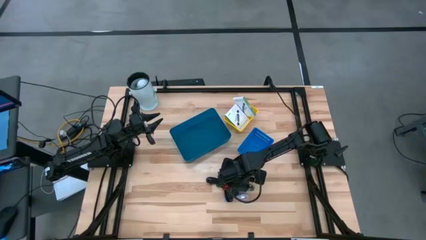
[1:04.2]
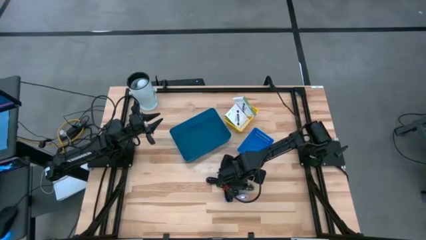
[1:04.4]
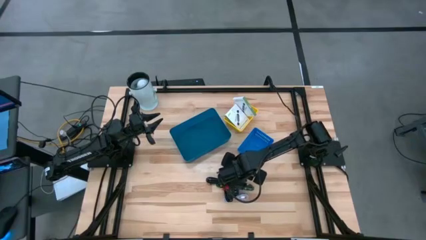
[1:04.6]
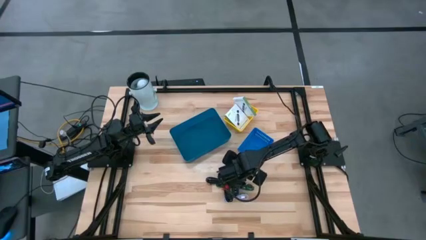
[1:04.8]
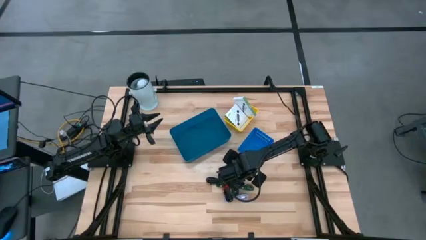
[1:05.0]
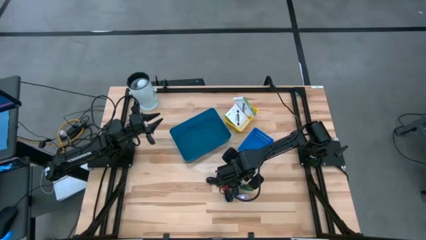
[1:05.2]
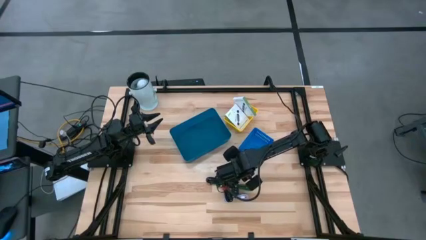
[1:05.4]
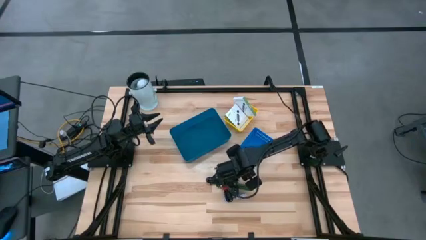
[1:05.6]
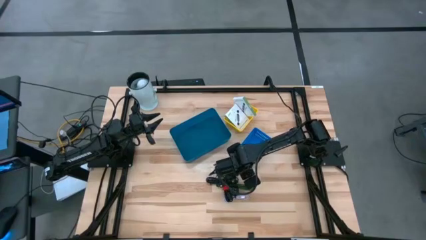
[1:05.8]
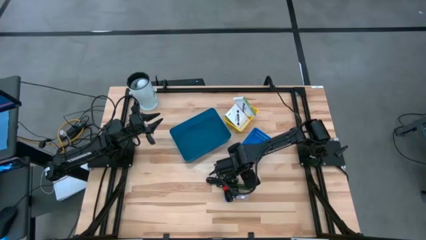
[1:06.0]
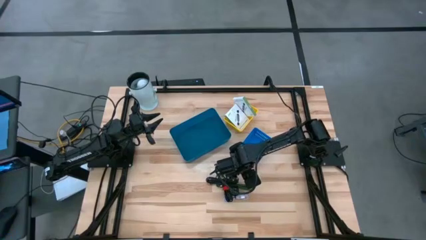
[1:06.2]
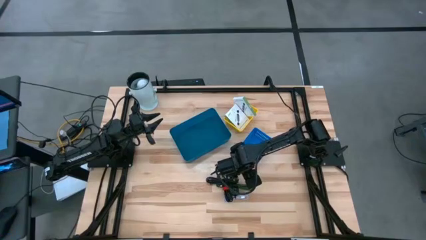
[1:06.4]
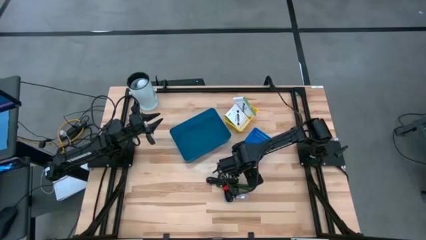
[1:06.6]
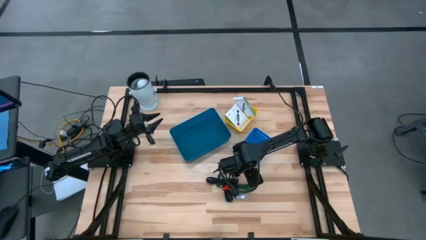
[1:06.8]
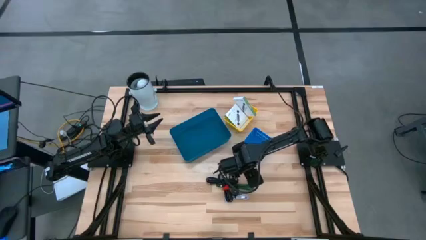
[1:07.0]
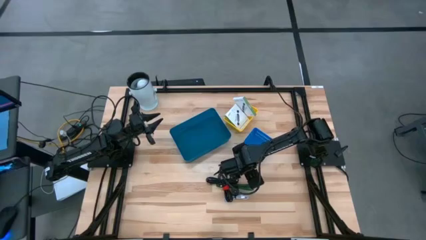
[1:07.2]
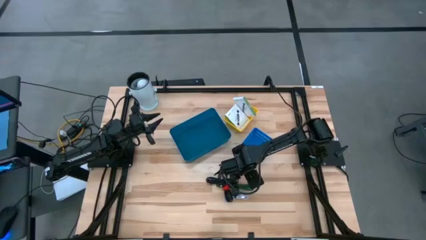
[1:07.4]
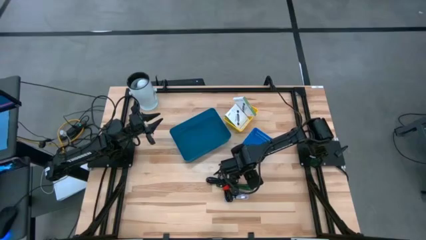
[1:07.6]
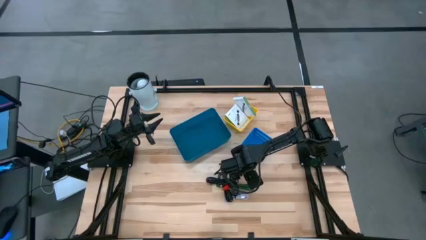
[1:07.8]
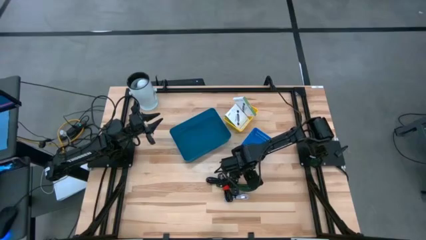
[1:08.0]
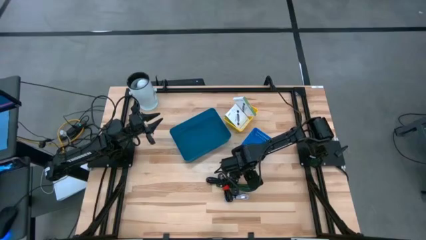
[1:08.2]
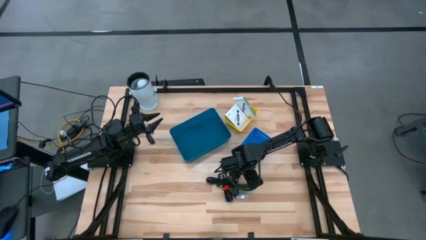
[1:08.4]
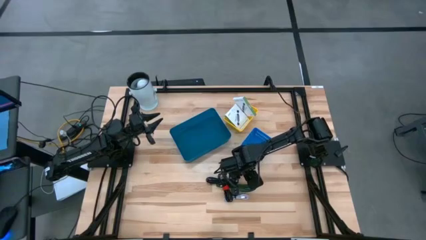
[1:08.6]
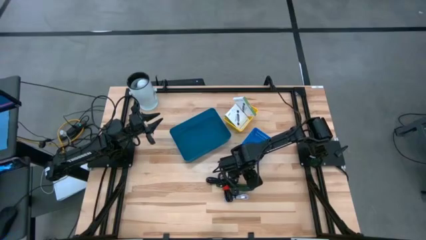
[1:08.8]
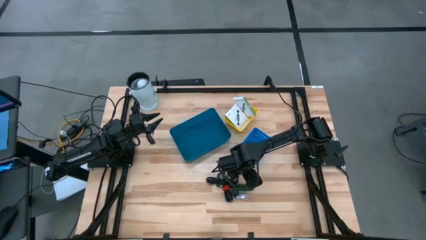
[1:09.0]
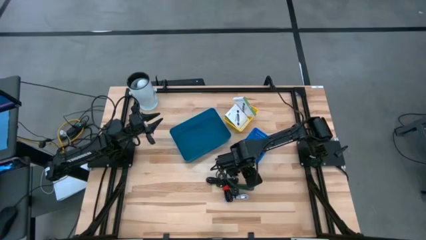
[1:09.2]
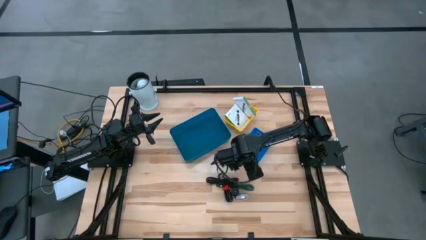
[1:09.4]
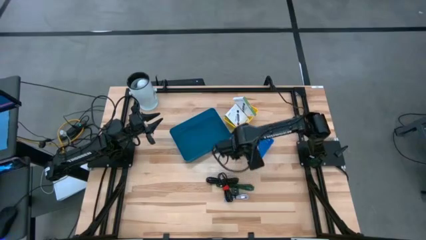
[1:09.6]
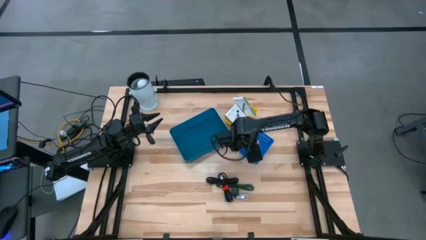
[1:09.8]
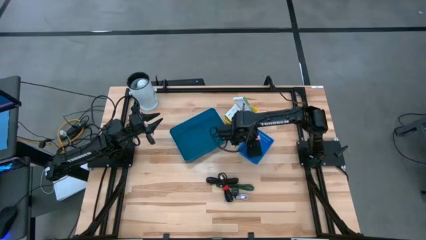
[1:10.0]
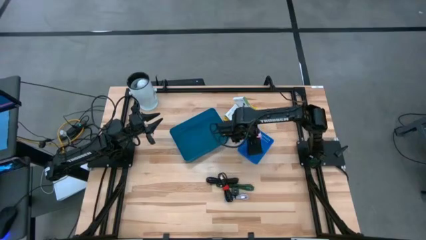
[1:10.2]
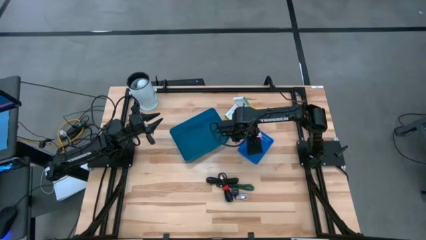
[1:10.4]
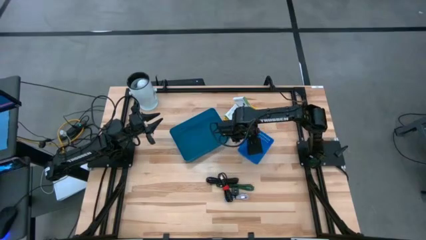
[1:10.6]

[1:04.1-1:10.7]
Task: Pick and place items into bin
Put the pink charger adapter into the blue bin

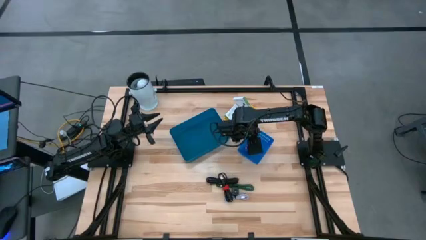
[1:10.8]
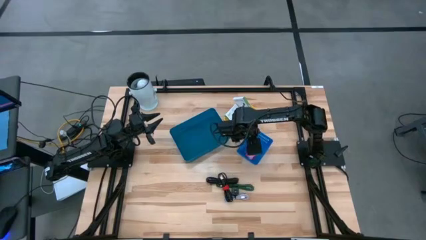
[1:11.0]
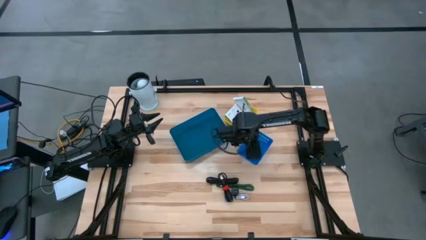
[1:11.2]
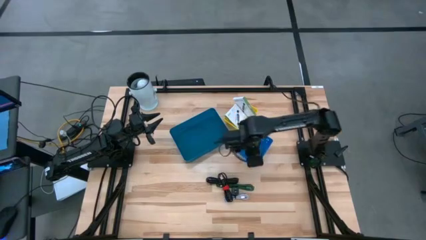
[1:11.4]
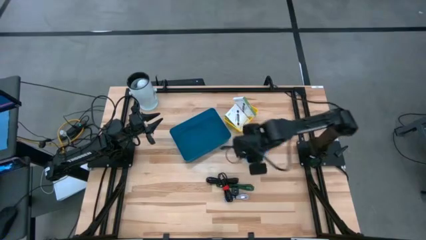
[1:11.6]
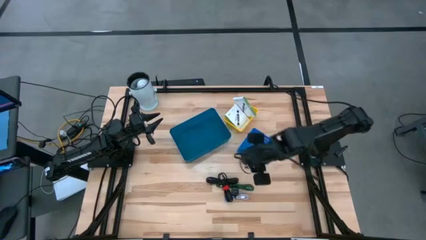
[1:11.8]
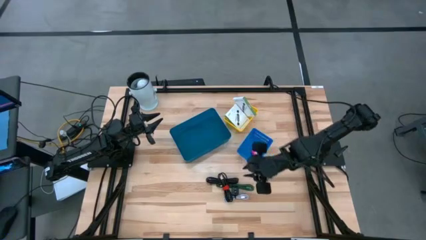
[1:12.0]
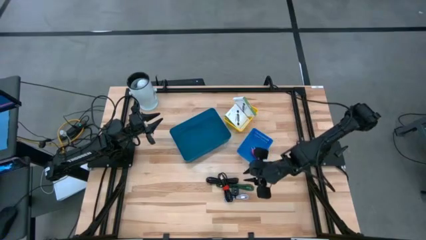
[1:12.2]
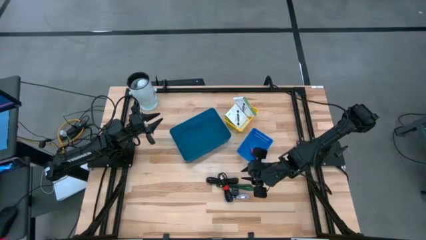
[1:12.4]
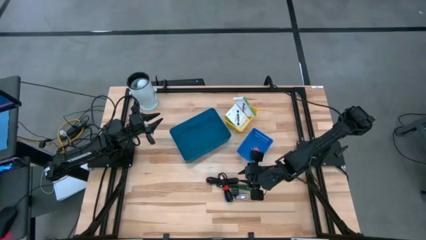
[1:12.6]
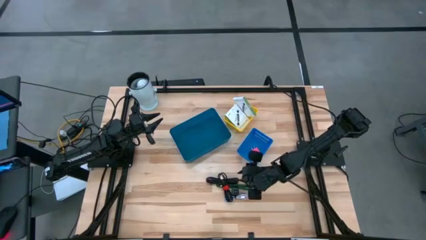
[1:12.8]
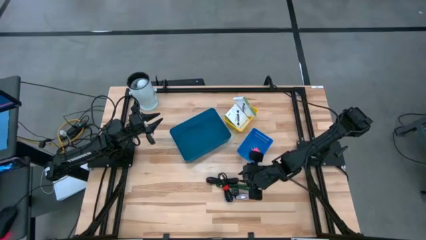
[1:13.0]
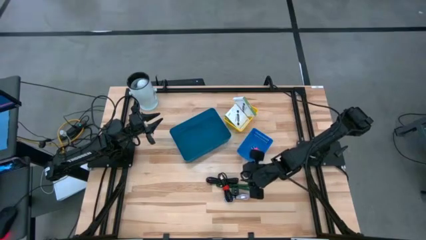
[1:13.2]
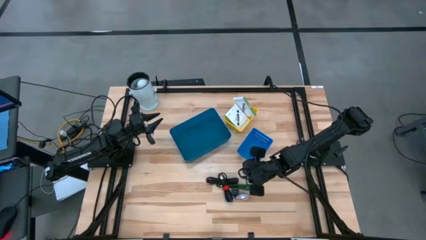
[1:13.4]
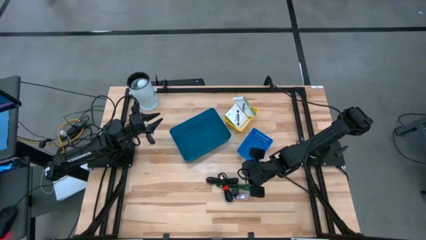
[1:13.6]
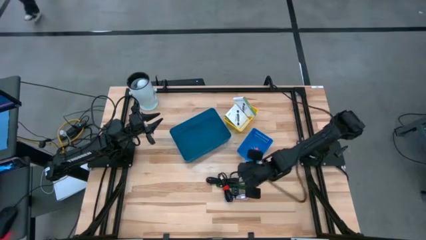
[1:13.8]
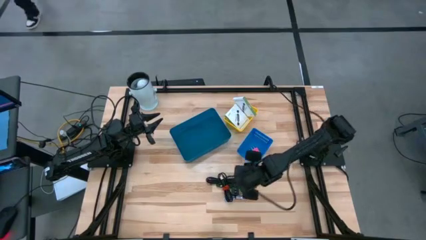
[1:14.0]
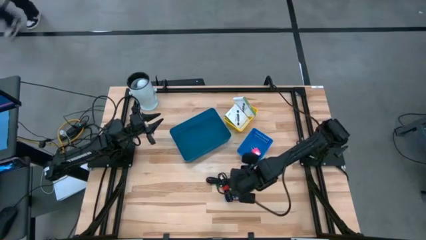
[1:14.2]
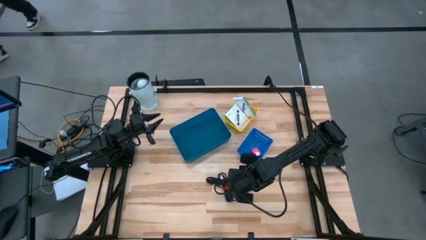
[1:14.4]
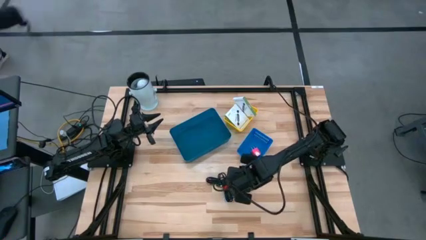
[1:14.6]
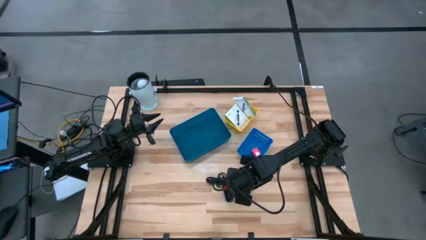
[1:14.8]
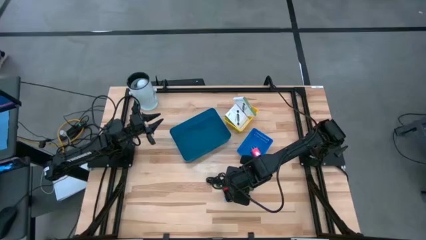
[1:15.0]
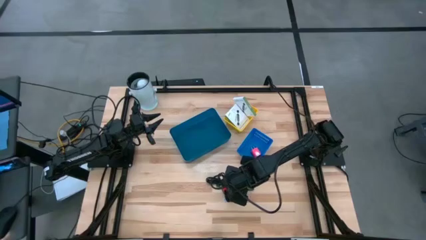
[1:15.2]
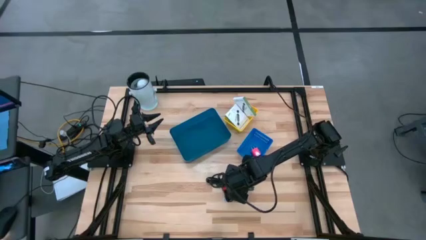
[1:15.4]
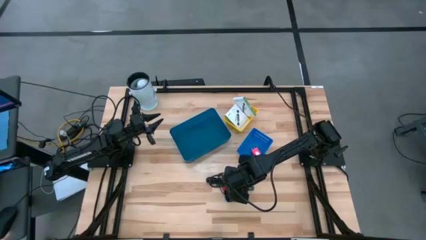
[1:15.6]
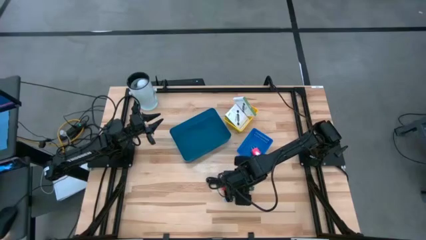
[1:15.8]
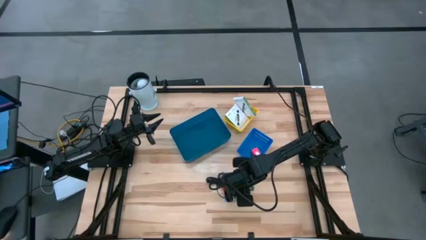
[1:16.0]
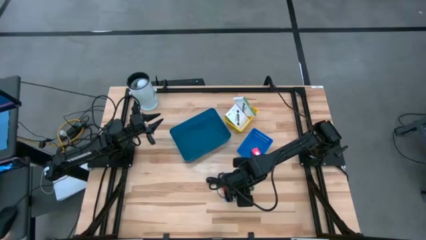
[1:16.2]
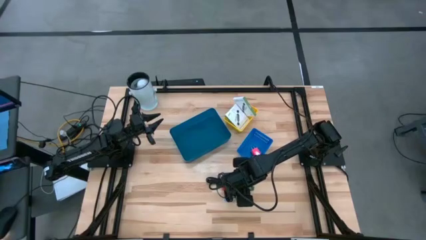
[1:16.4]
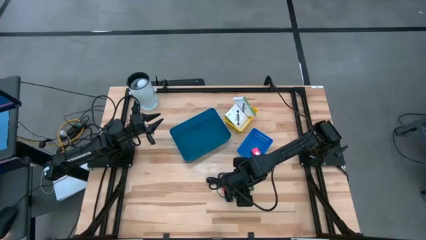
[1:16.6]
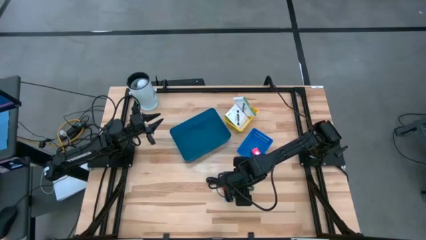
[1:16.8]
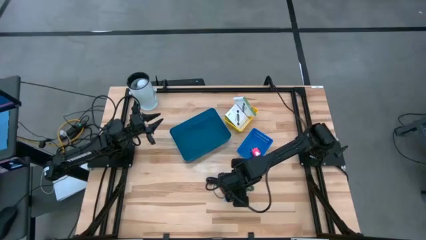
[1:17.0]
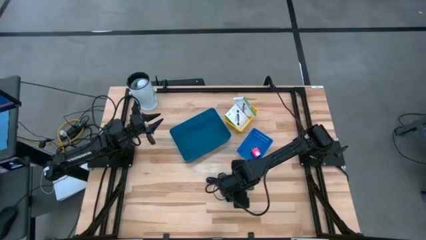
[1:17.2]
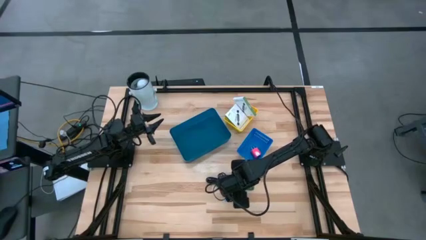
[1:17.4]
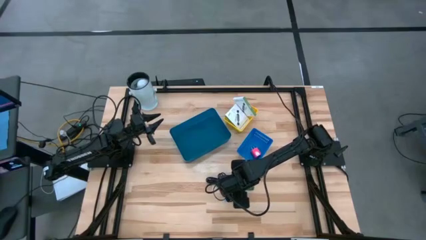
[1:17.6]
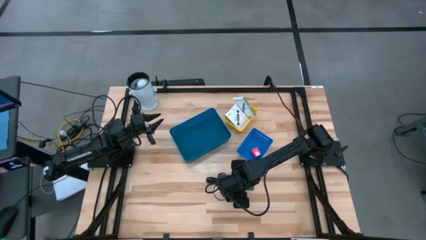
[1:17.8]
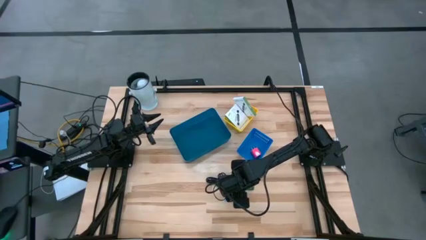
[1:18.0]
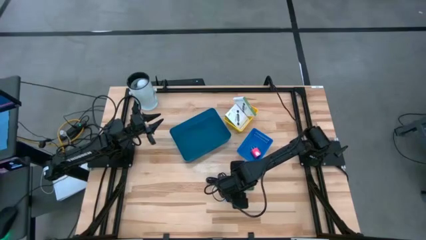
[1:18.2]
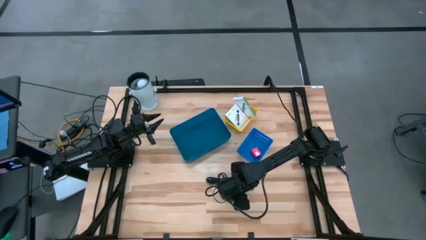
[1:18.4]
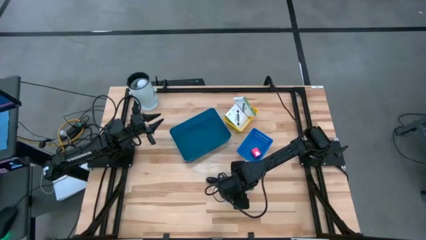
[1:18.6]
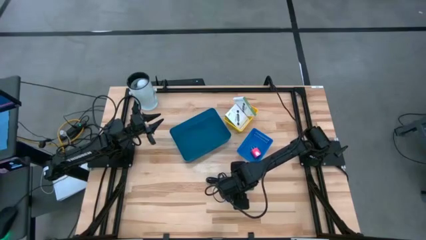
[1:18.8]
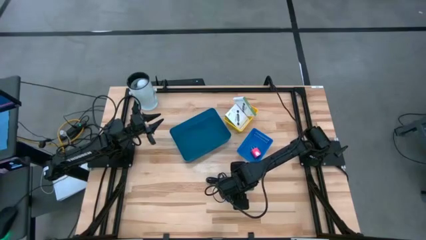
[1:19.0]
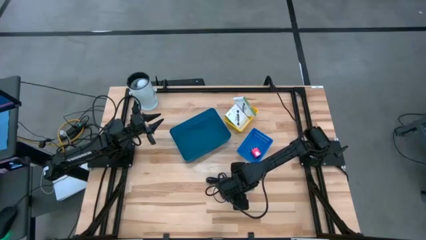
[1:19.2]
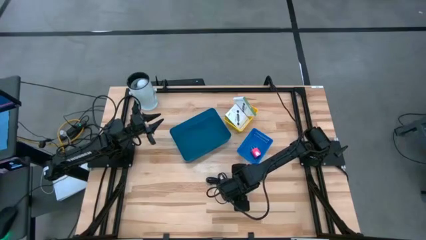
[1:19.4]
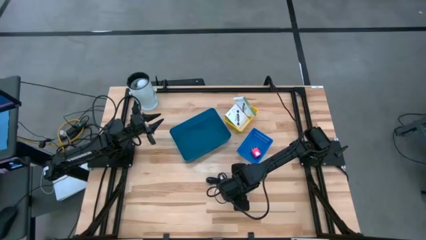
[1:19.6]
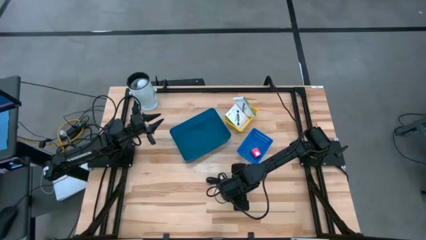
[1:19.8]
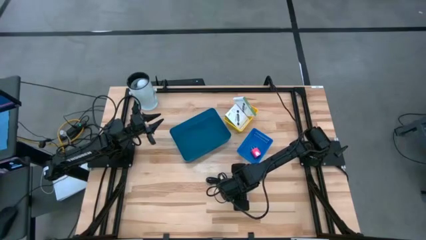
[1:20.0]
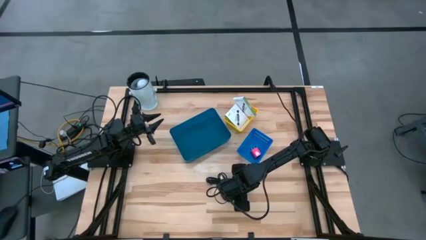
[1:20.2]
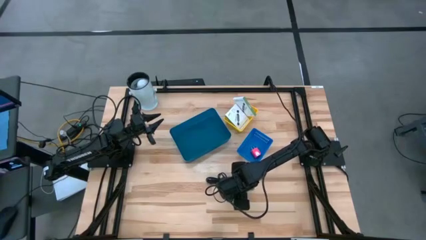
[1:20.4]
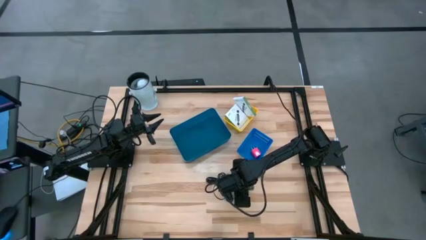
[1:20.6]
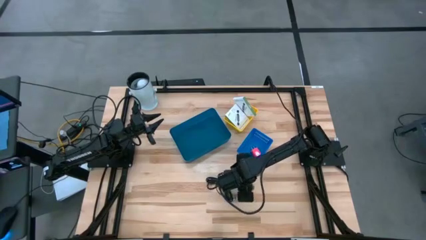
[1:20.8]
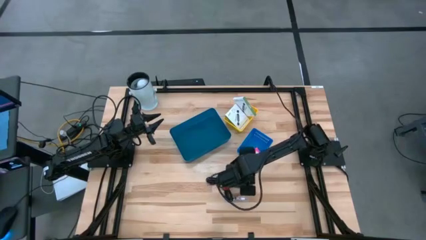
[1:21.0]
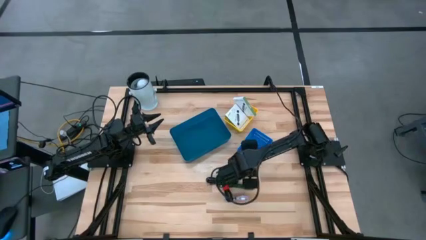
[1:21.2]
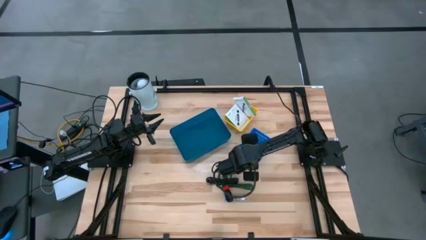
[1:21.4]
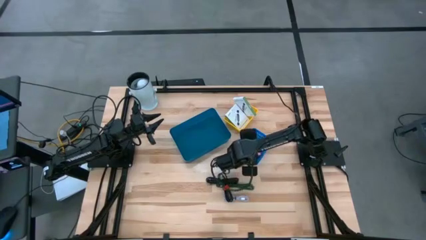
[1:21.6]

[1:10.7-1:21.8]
Put the black charger adapter into the blue bin
